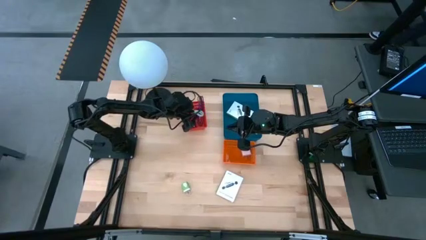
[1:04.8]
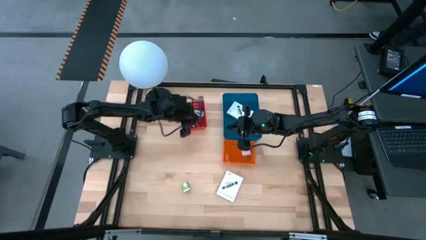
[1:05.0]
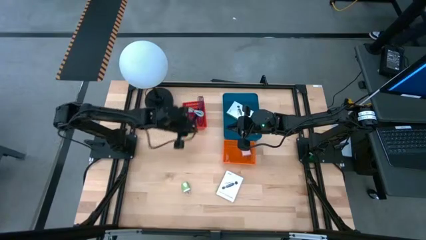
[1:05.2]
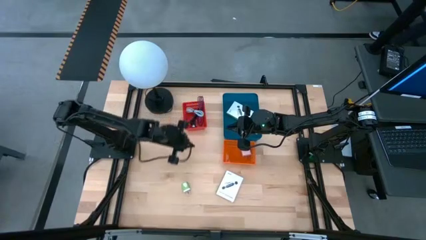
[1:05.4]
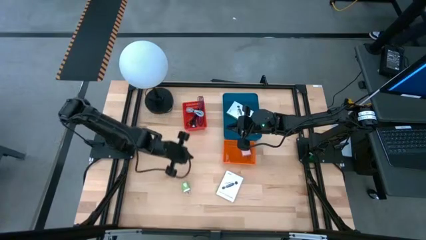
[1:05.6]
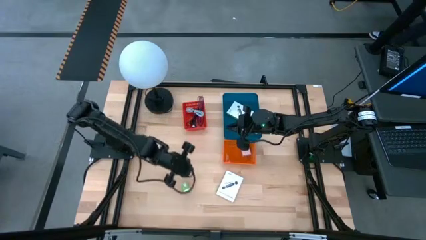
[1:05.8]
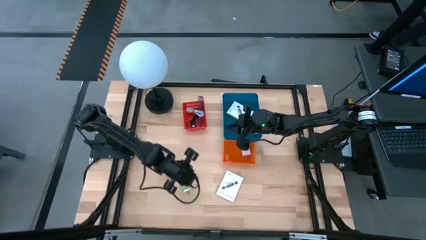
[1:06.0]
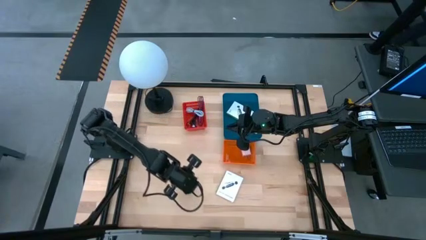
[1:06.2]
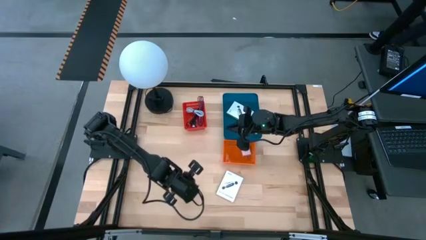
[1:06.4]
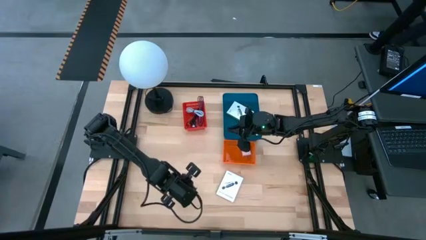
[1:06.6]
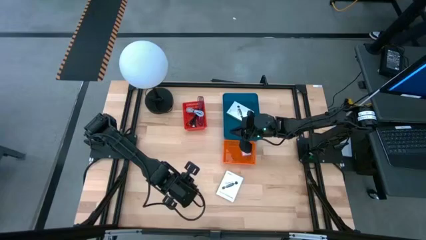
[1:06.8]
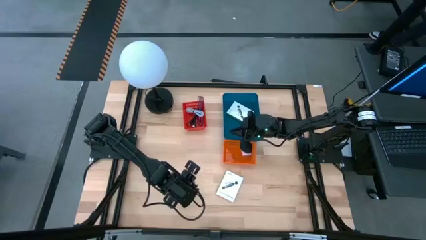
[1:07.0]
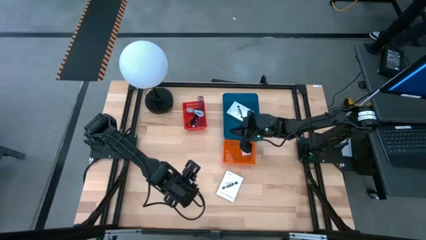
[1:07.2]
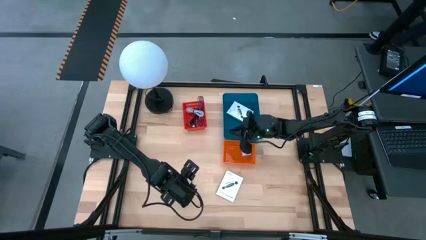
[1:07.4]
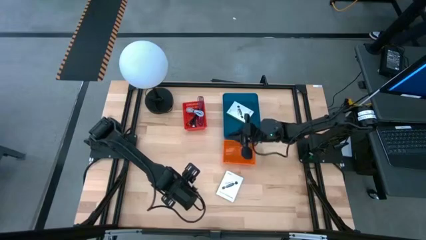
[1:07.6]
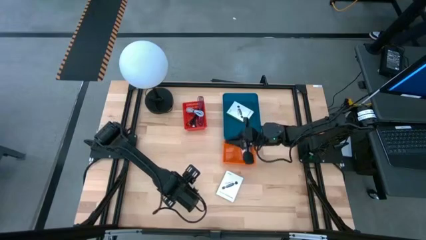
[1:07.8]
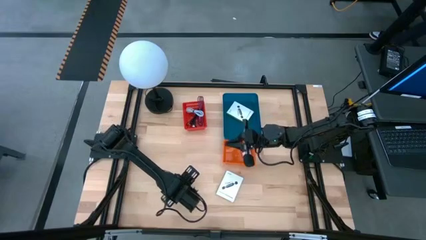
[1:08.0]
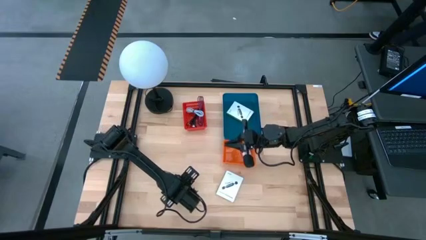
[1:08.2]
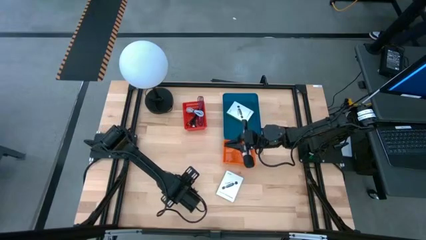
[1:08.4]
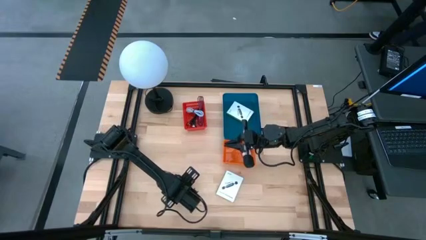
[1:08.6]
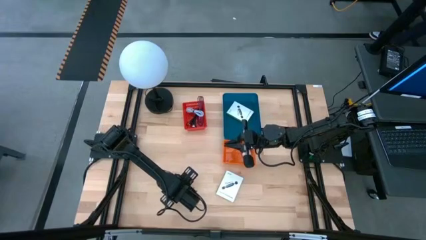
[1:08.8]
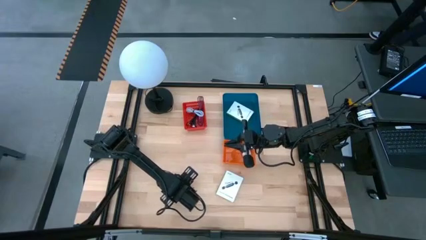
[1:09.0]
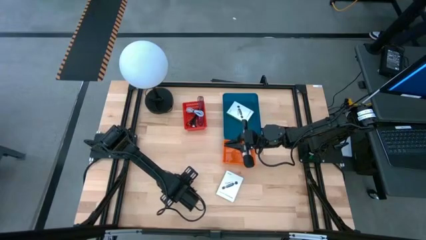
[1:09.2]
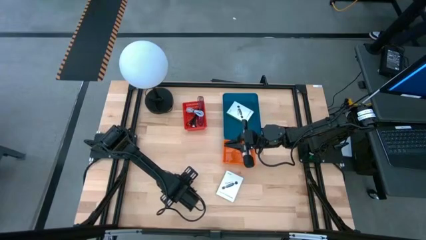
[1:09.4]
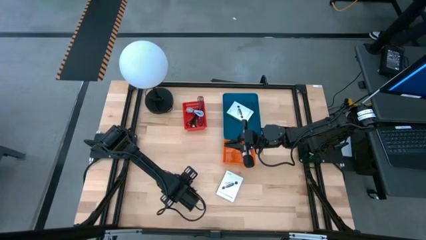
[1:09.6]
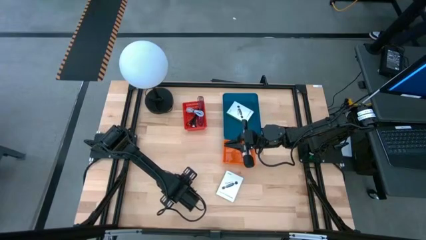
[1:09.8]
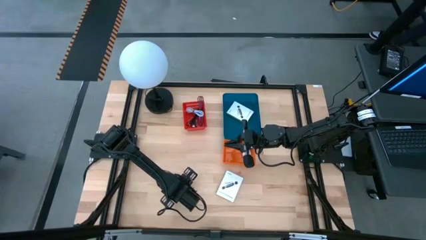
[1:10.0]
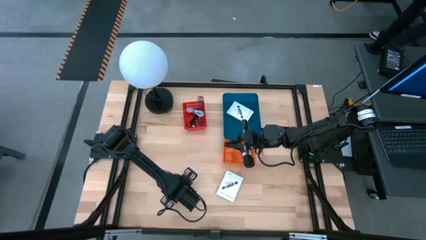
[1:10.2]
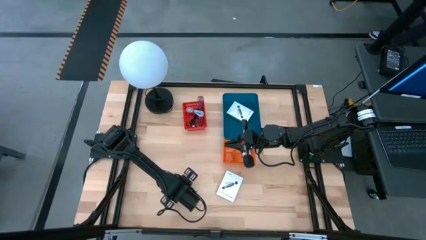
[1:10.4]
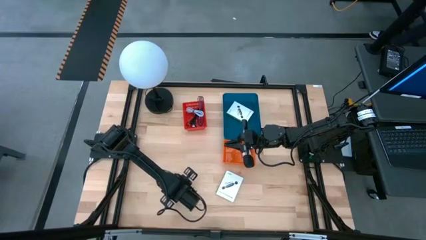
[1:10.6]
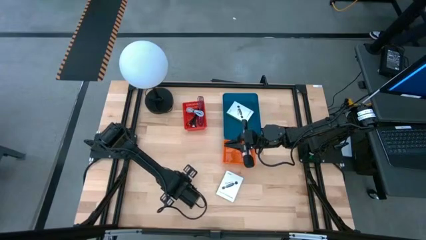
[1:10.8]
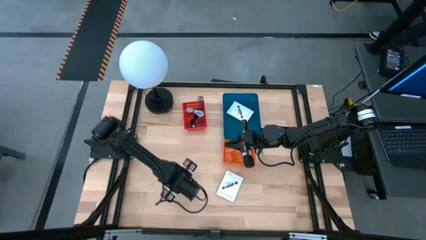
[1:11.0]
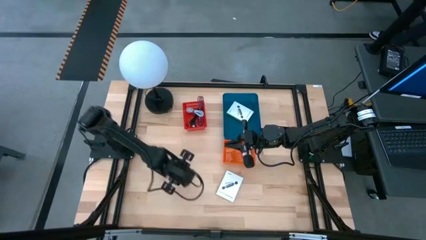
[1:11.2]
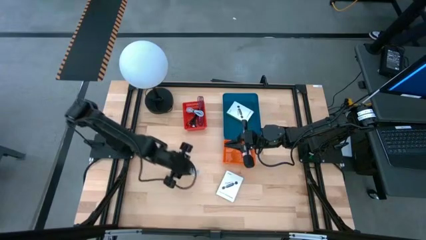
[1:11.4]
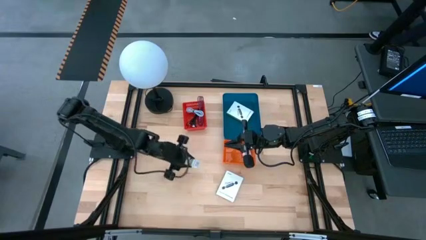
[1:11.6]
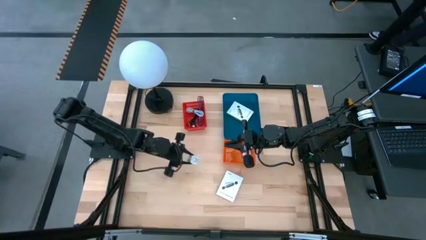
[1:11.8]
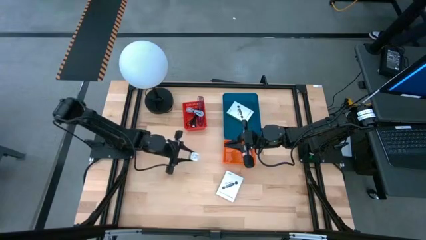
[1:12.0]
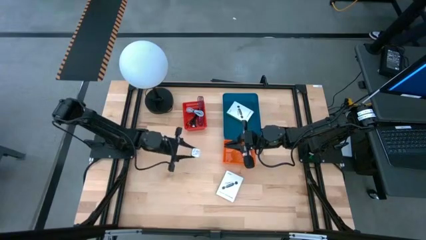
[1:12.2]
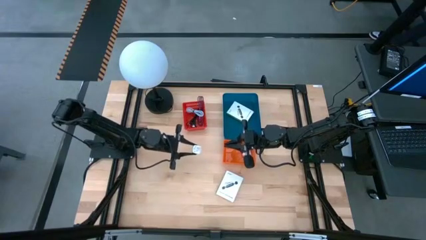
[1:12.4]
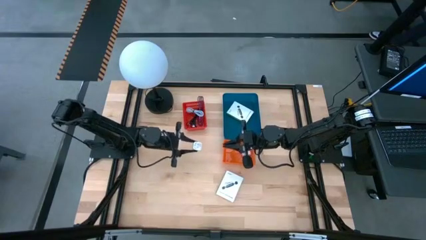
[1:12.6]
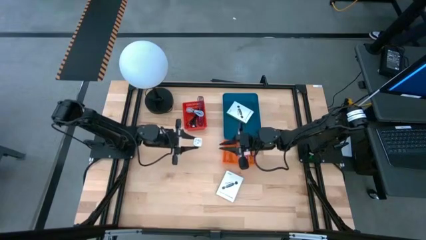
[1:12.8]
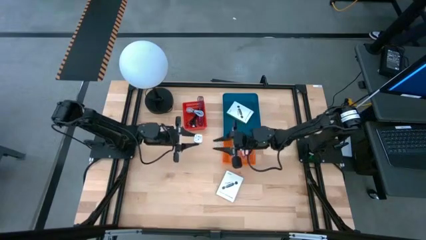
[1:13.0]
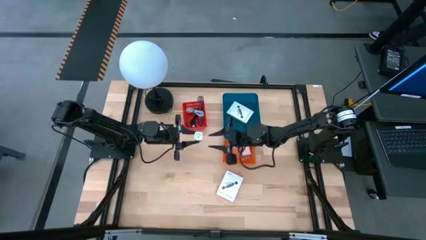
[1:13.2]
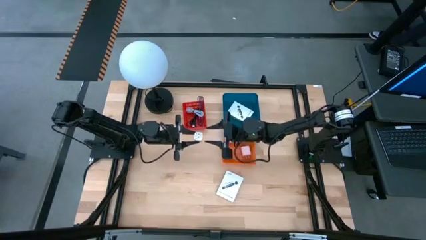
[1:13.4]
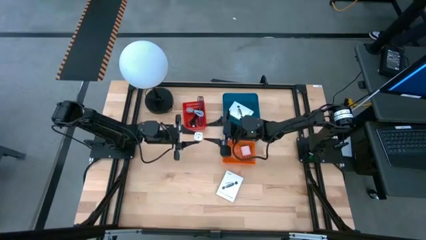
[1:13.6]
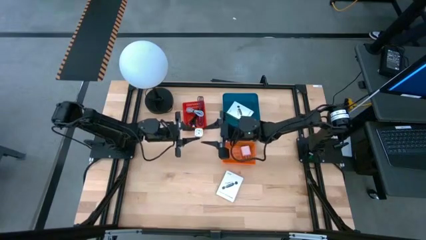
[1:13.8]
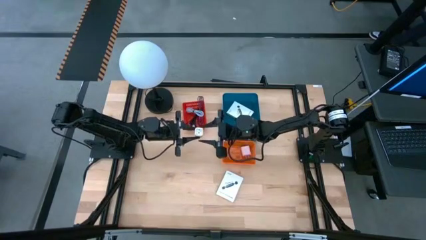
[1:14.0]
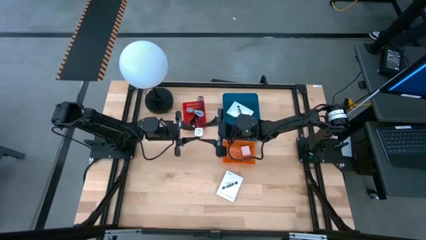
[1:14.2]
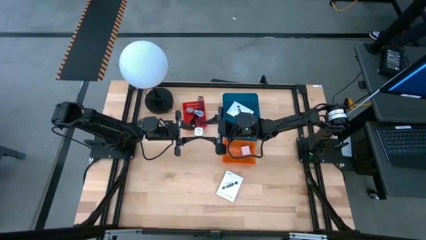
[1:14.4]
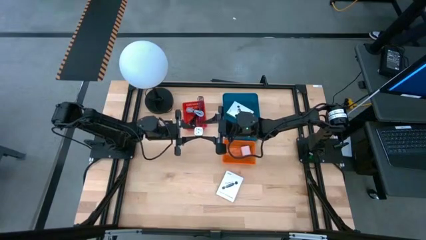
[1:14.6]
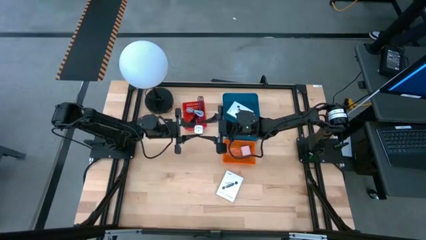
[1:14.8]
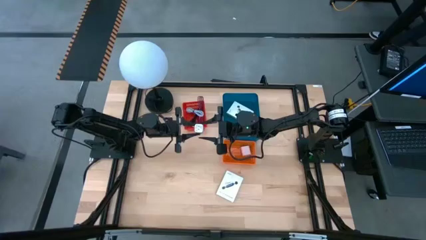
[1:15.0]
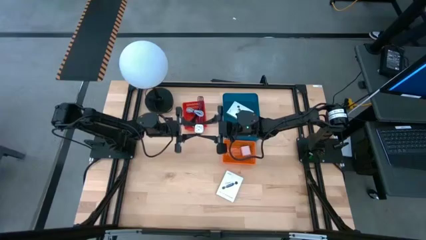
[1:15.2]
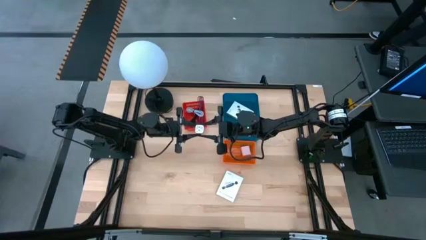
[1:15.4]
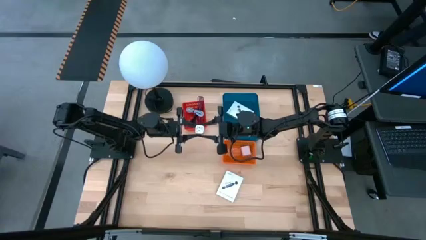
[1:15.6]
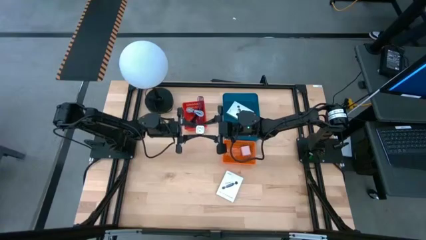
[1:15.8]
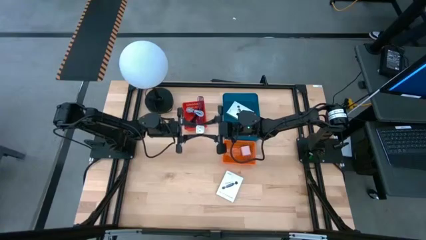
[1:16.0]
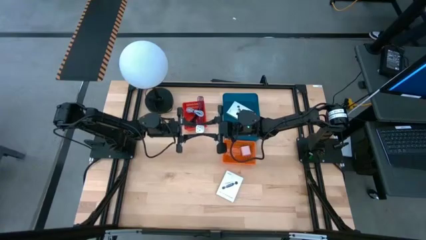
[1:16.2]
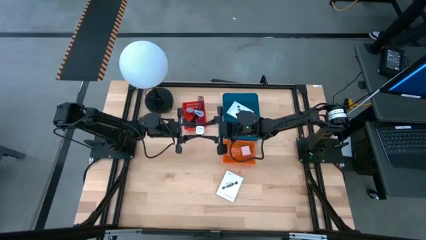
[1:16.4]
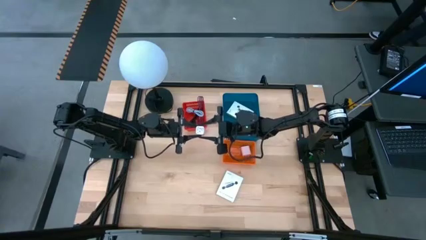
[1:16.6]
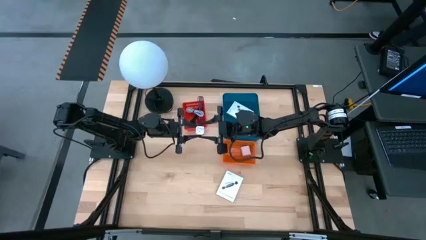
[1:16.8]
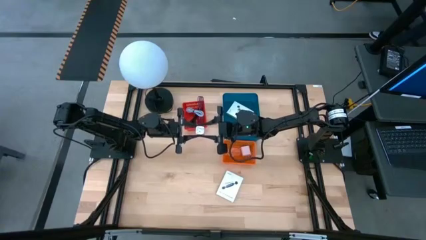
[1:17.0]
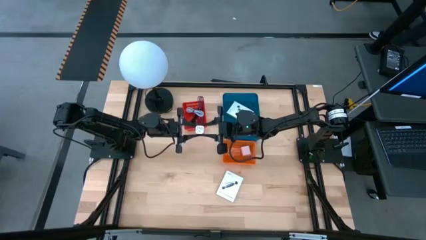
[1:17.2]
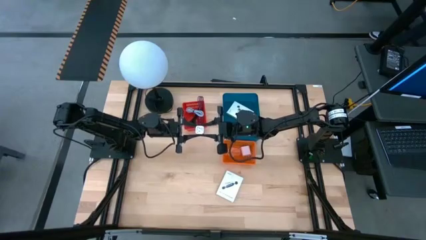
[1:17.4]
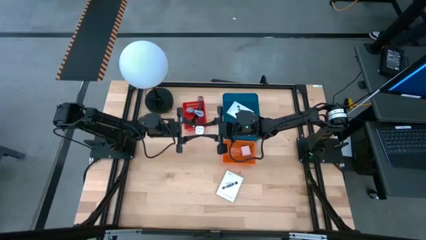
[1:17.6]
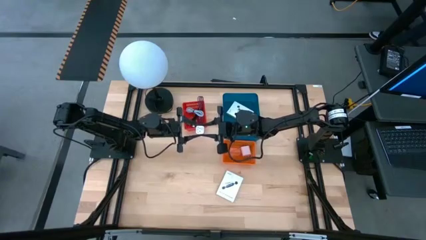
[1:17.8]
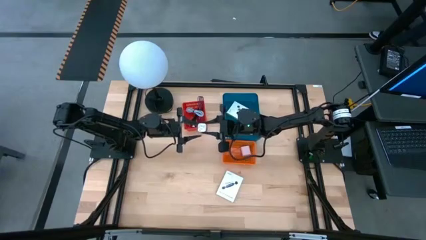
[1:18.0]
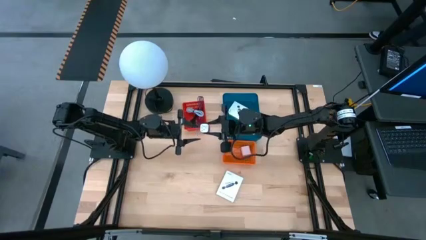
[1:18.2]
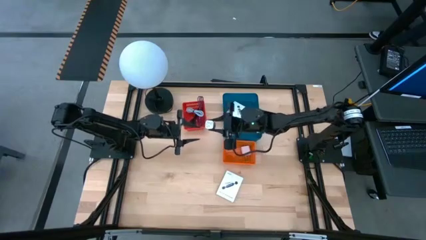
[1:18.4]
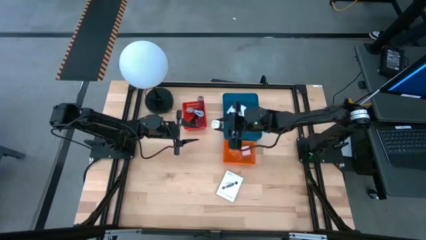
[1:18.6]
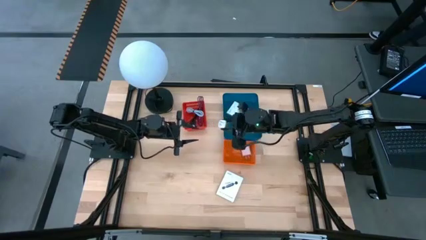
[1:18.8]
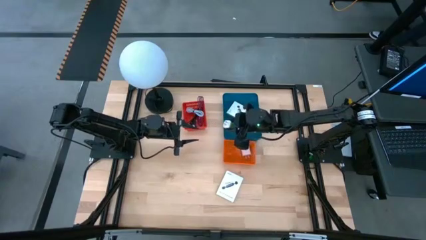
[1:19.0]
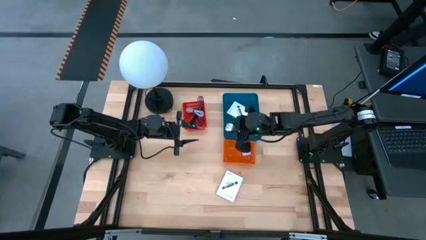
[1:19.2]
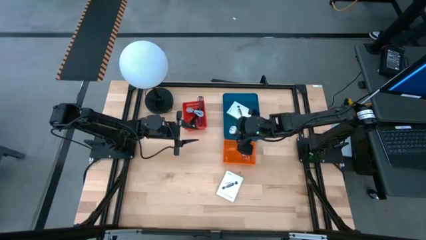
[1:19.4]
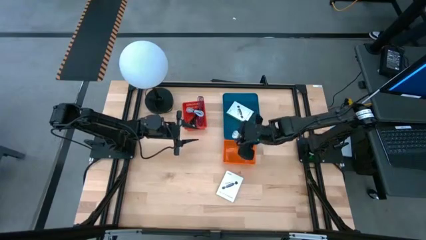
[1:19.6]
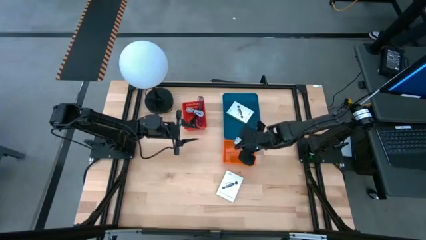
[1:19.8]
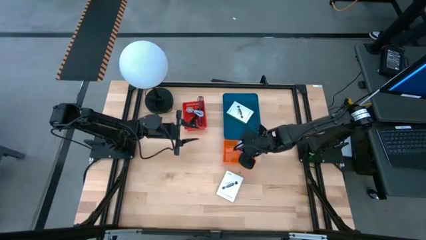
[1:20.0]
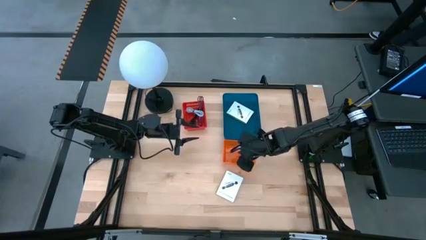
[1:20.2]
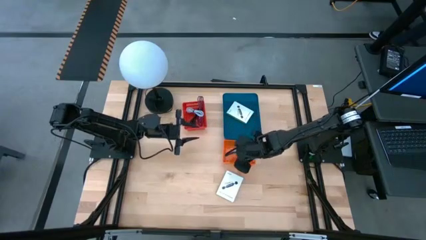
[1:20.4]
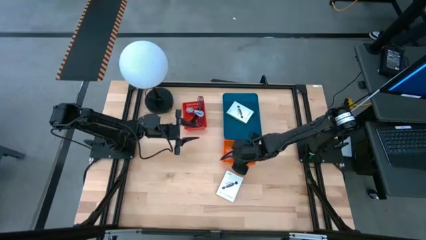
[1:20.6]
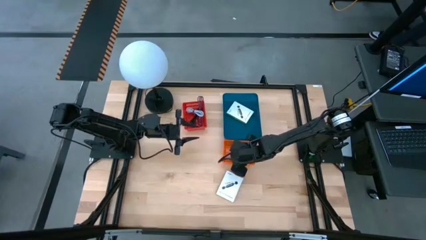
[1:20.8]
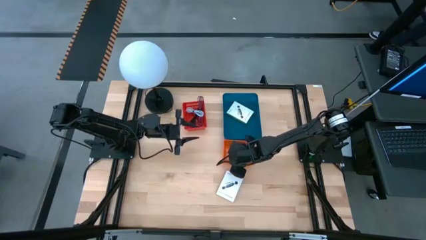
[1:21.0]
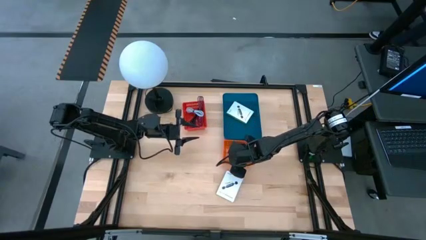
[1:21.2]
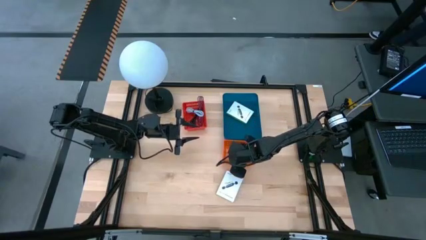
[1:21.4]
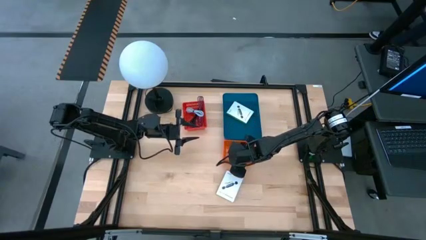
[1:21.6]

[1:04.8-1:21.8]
Task: Pick and place items into bin
Put the green charger adapter into the orange bin
